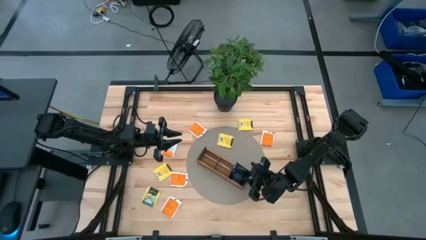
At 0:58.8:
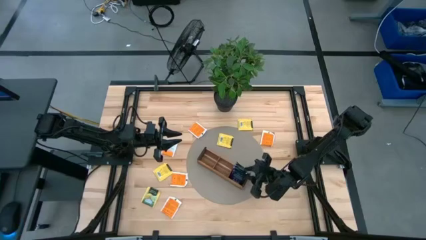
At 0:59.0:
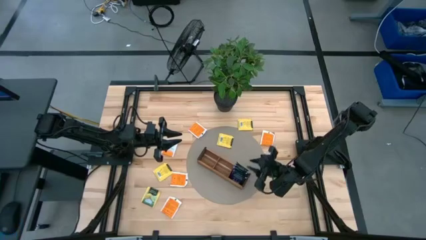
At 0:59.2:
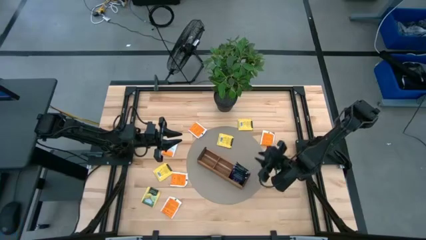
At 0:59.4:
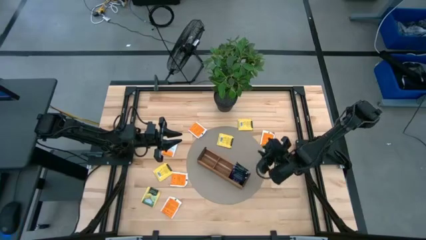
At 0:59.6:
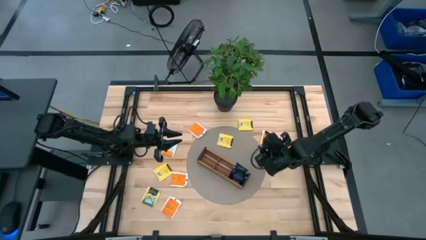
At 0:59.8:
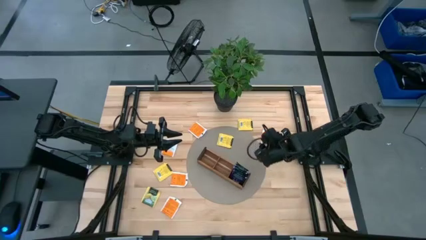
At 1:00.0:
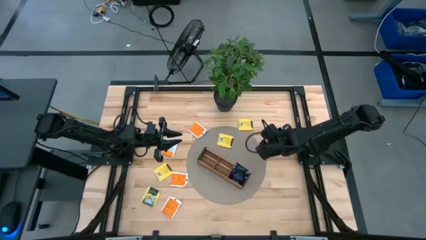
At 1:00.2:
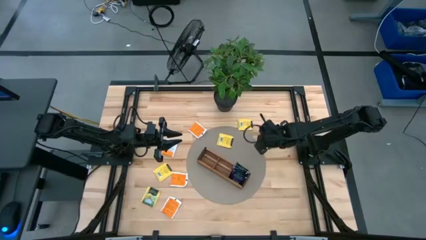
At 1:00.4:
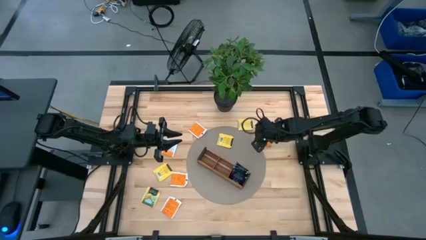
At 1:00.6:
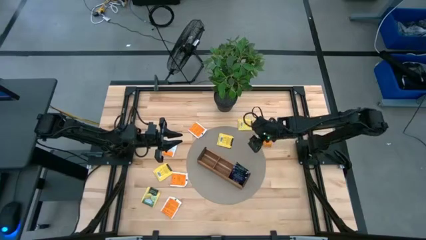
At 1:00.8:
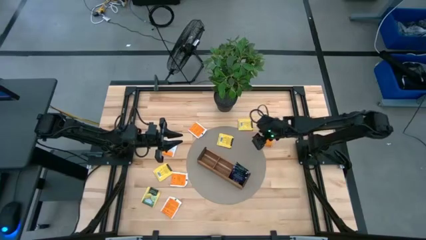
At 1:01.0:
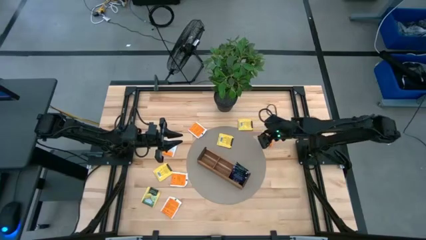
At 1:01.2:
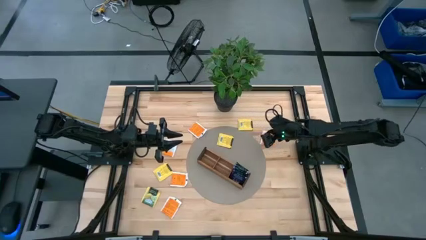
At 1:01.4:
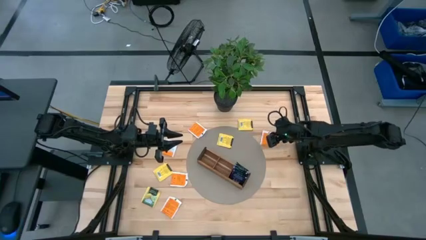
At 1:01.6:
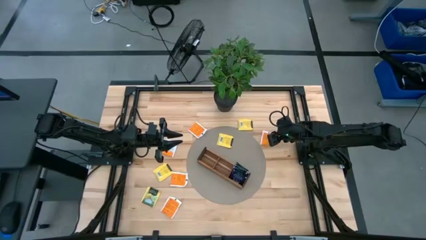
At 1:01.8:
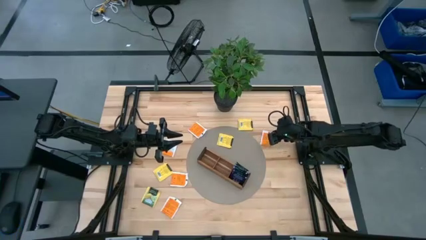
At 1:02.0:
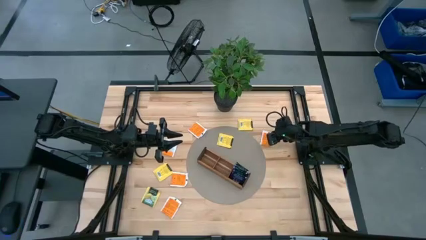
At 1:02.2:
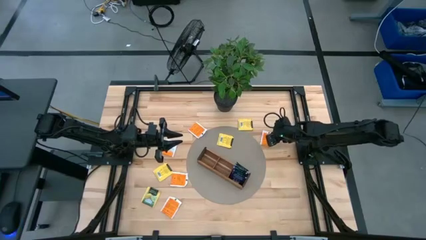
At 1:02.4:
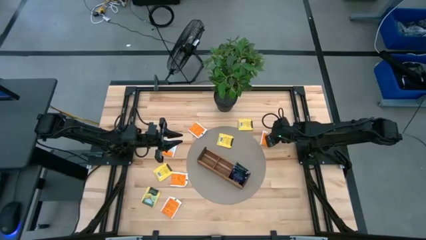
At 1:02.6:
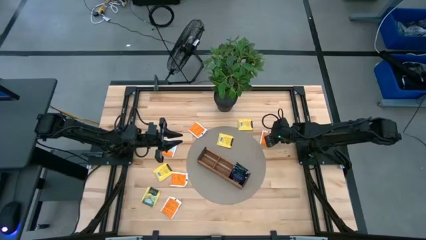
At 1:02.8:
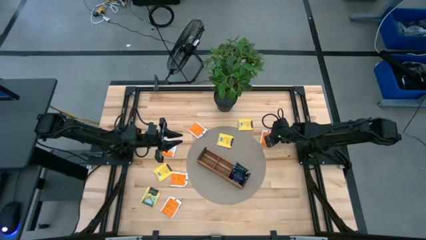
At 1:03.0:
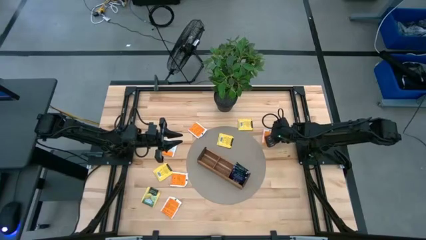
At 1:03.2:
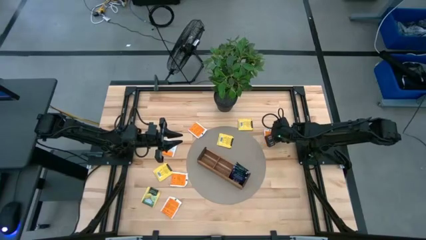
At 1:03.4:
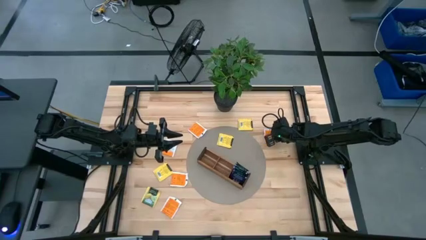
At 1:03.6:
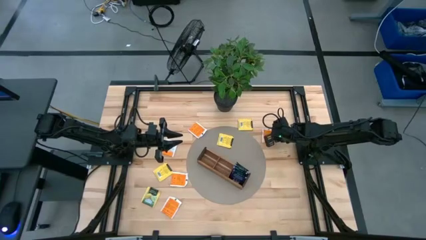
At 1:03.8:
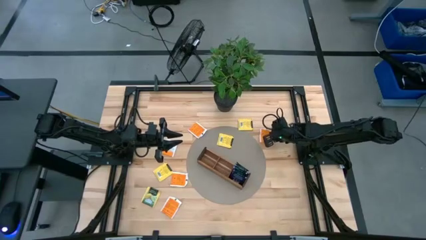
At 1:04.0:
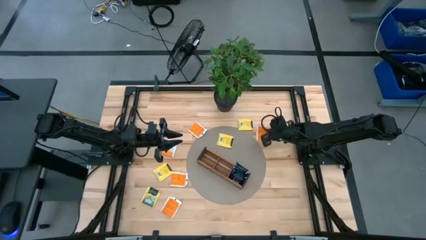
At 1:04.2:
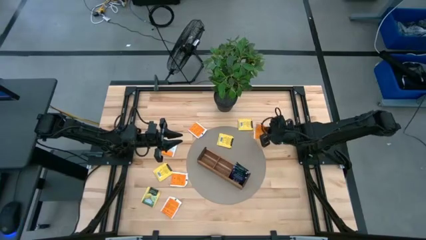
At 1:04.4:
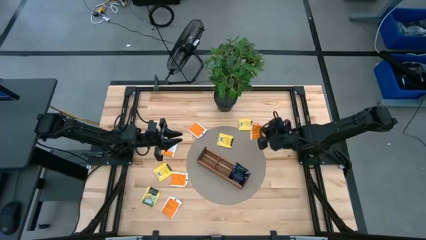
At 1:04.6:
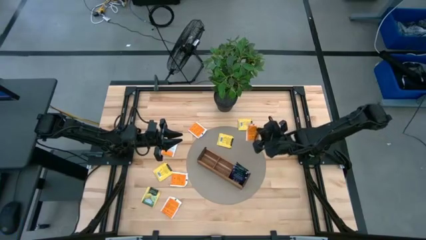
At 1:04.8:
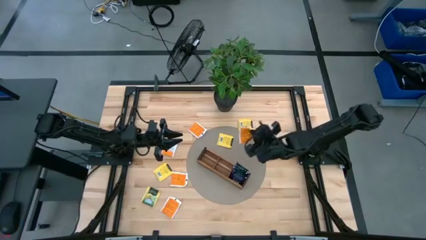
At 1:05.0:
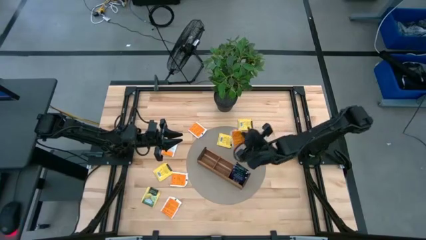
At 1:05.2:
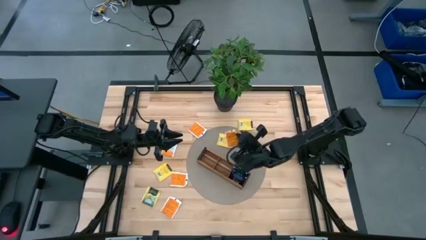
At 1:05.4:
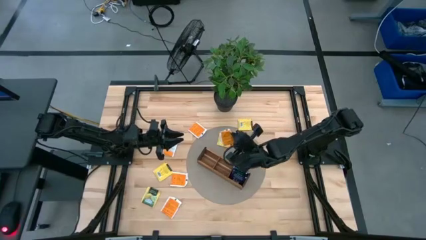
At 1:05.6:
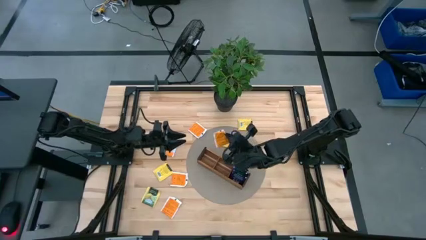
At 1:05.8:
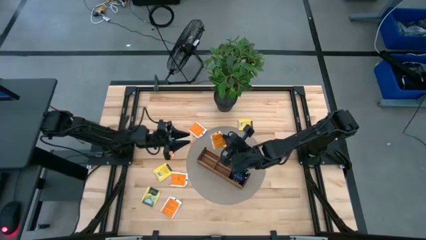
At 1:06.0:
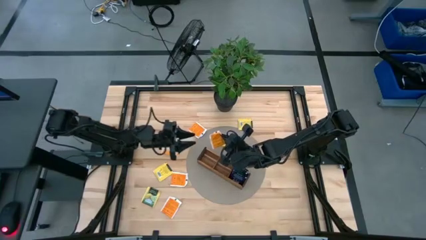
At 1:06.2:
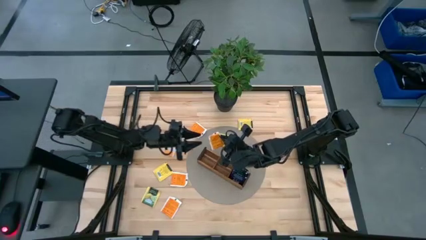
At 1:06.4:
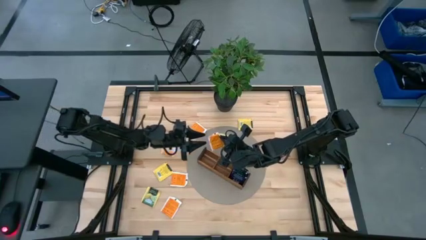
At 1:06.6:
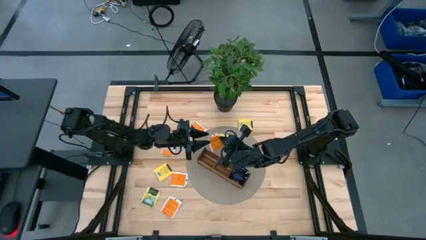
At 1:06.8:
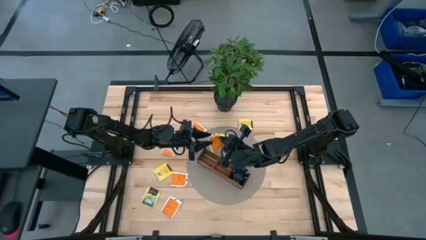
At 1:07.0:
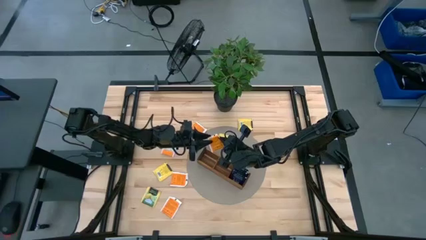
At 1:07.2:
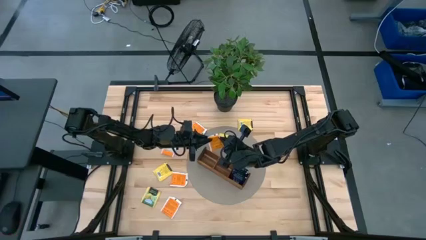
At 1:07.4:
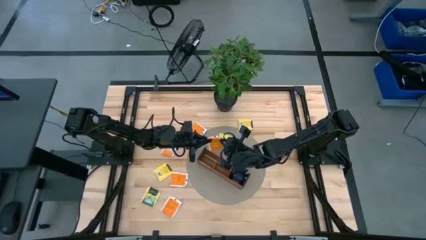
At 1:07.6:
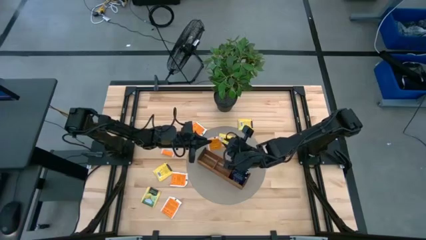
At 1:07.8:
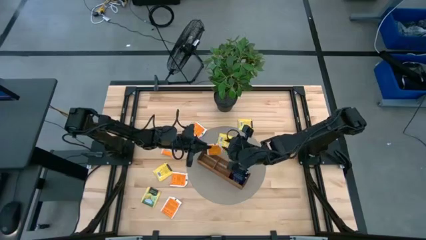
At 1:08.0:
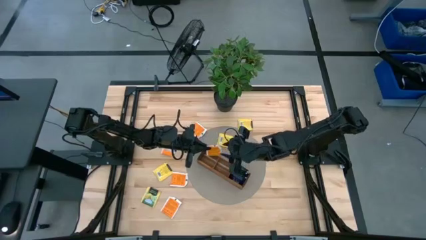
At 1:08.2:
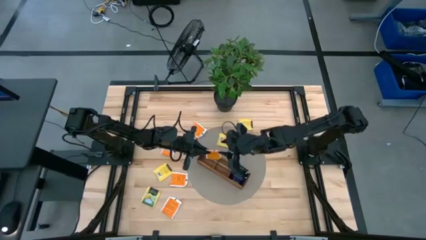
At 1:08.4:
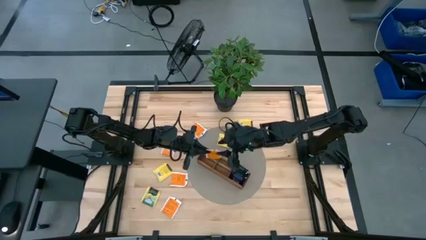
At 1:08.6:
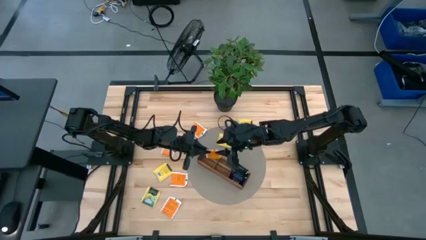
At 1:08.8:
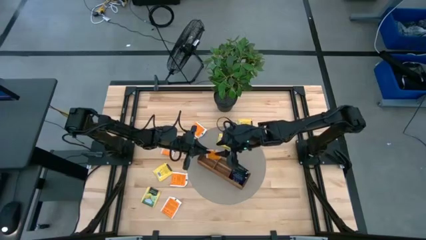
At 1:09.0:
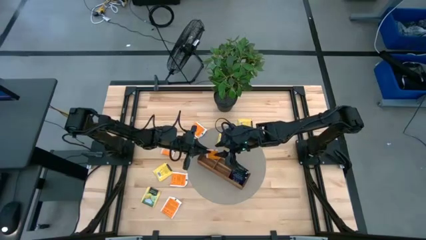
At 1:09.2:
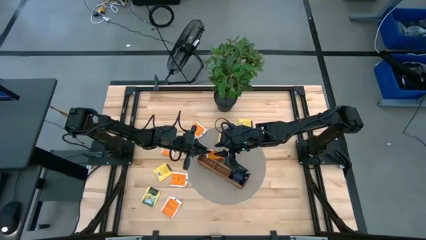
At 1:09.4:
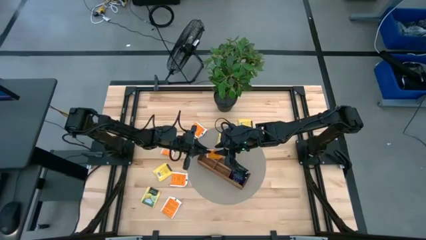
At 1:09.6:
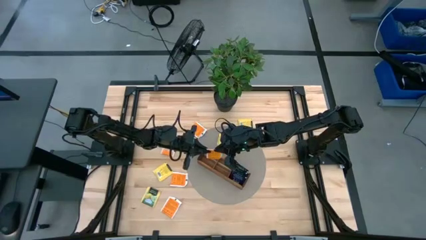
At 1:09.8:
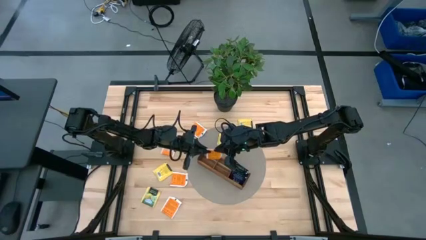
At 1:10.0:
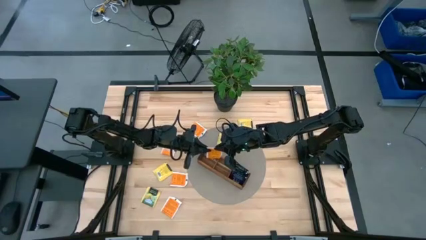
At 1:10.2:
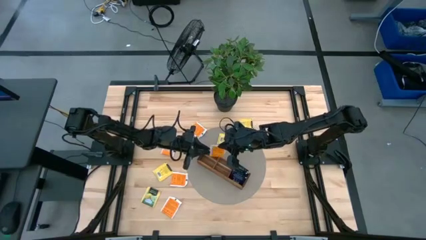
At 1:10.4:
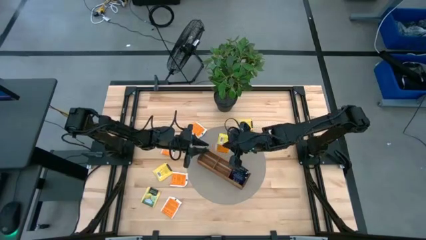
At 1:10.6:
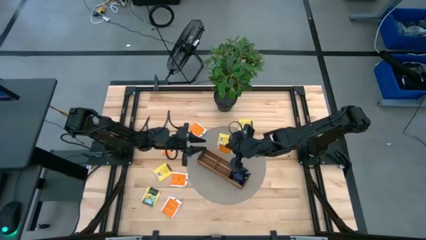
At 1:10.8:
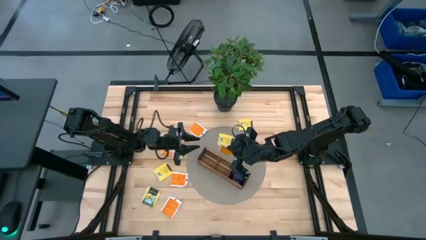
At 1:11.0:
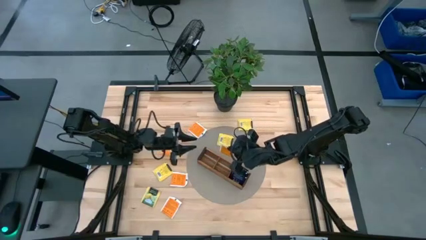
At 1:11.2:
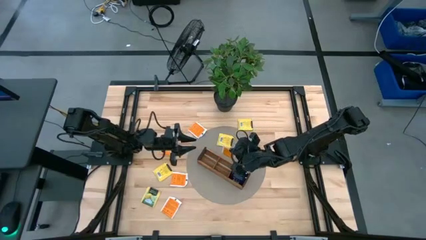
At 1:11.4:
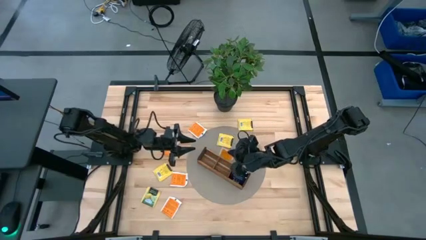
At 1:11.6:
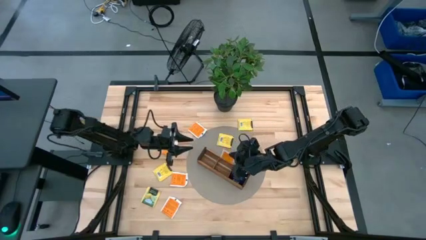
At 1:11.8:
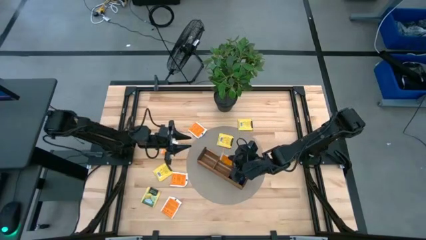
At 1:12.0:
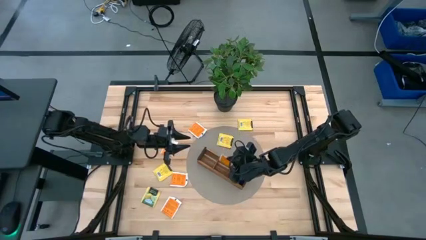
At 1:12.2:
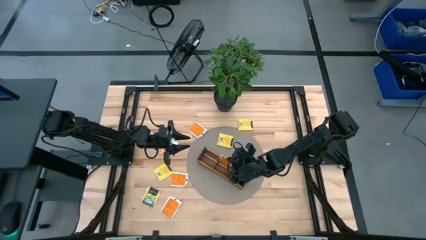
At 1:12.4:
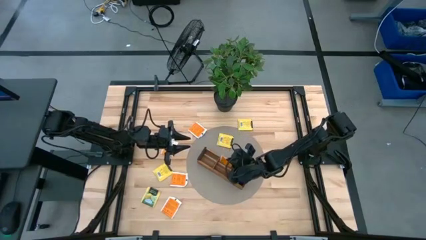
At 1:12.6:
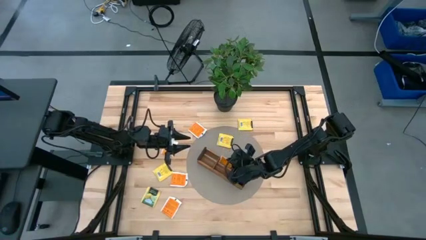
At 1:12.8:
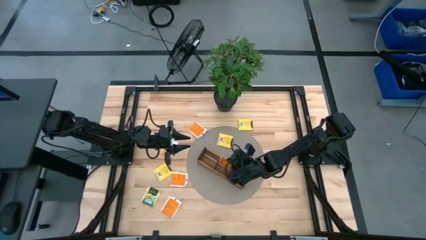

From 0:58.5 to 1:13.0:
Task: Pick & Place Tea
Put the orange tea bag into the middle section of the wooden organizer

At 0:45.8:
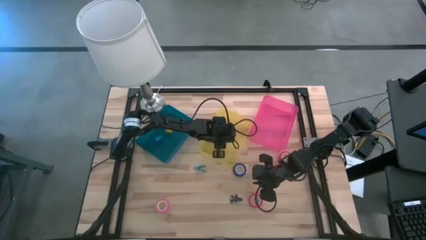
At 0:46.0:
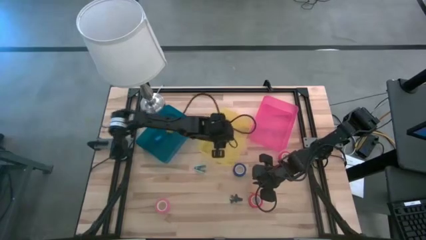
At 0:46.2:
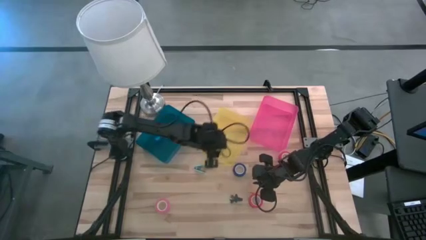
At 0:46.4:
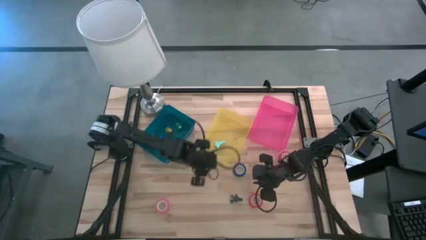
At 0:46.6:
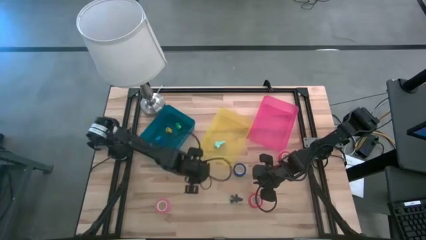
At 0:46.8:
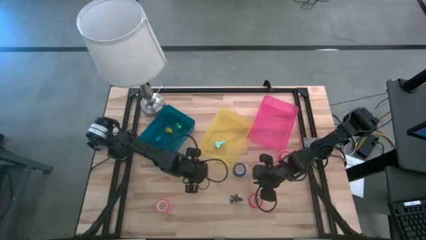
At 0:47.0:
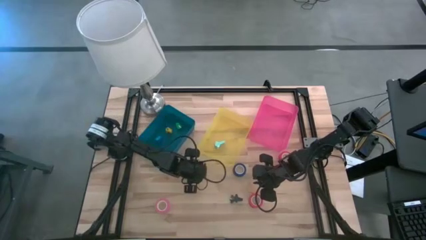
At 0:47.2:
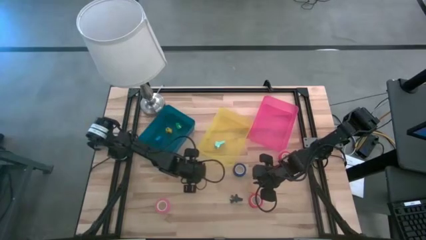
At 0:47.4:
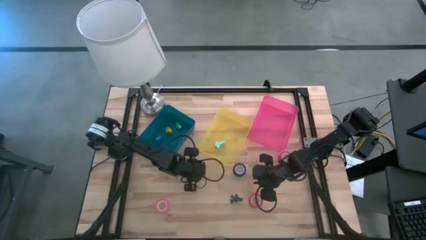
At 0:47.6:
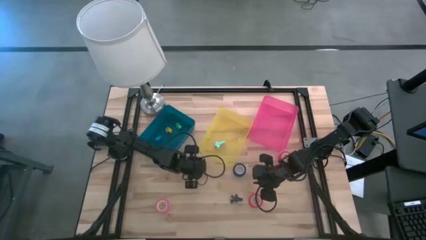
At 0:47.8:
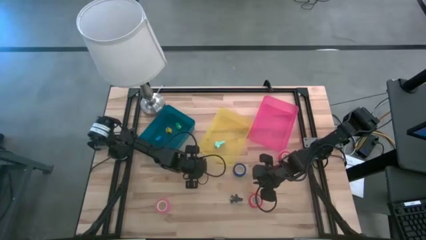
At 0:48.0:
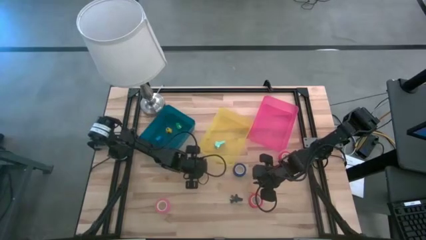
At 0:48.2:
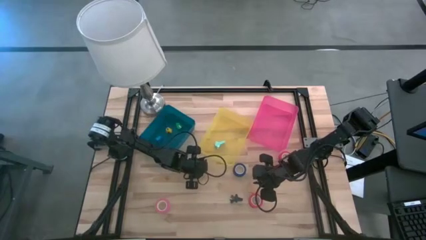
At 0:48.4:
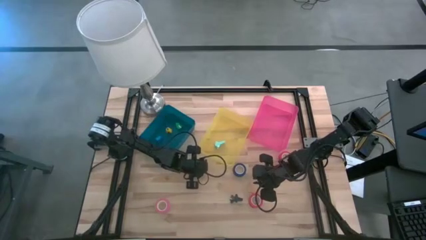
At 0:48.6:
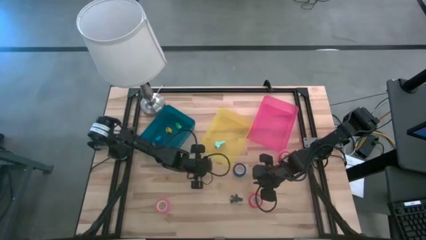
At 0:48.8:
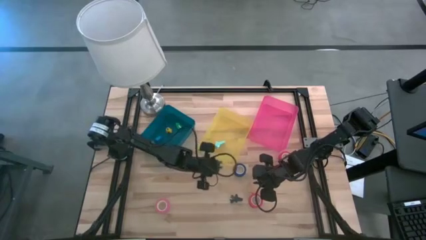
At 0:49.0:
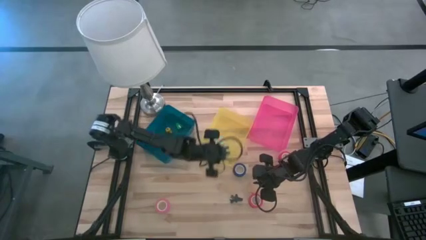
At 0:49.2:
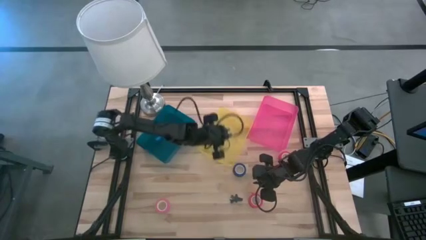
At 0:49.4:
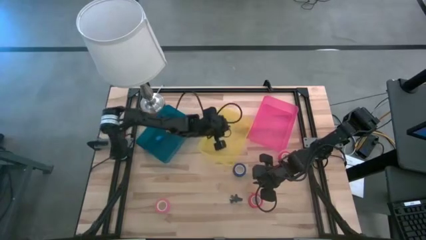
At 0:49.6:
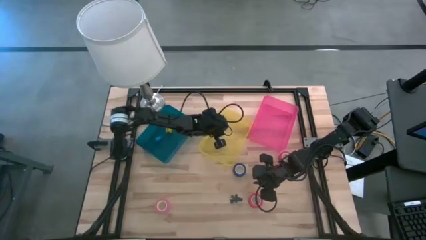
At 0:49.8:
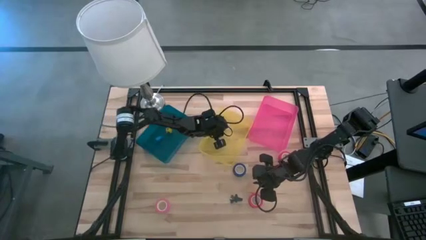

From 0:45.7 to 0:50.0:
Task: Pick and place Stapler, Stapler remover, tape
Put the light blue staple remover into the yellow bin
